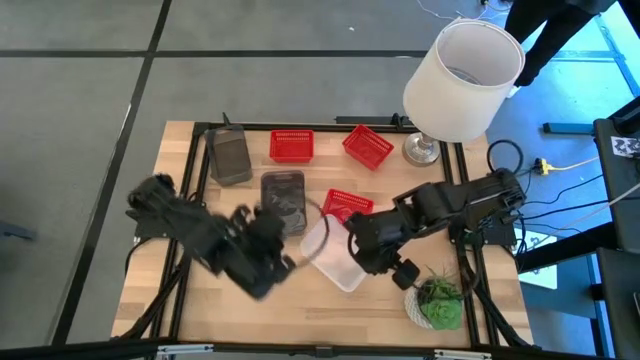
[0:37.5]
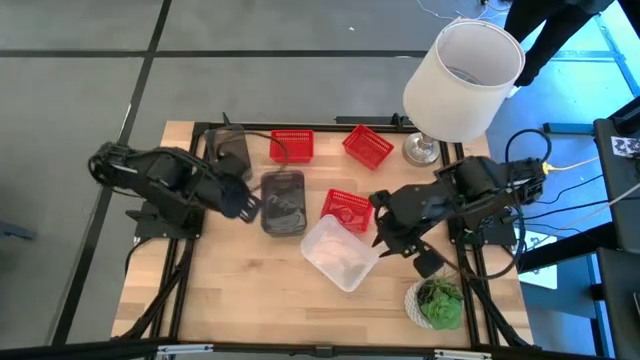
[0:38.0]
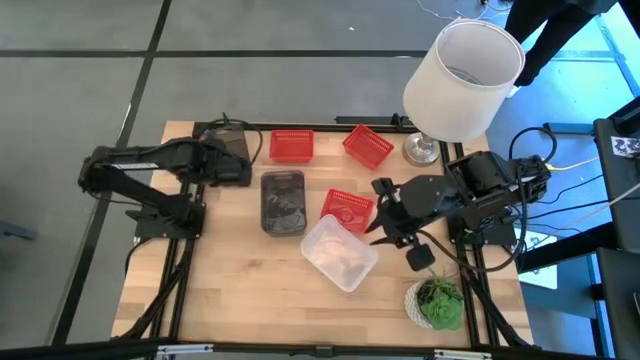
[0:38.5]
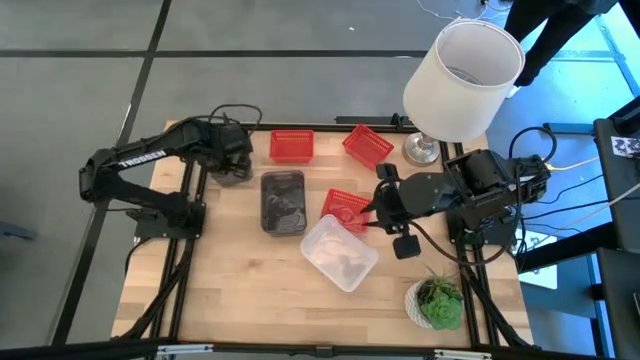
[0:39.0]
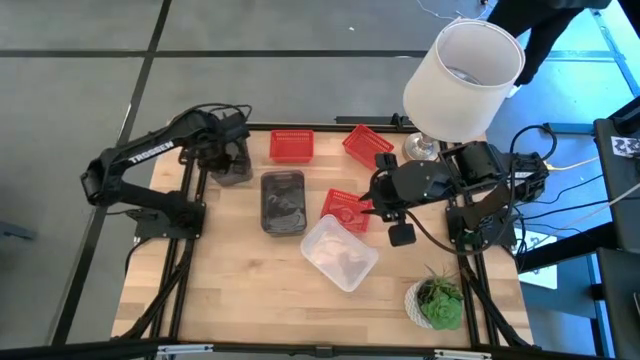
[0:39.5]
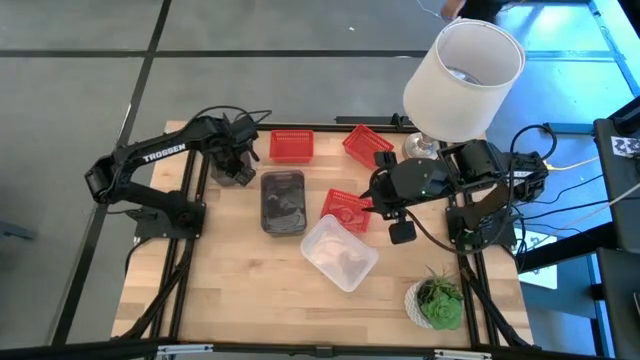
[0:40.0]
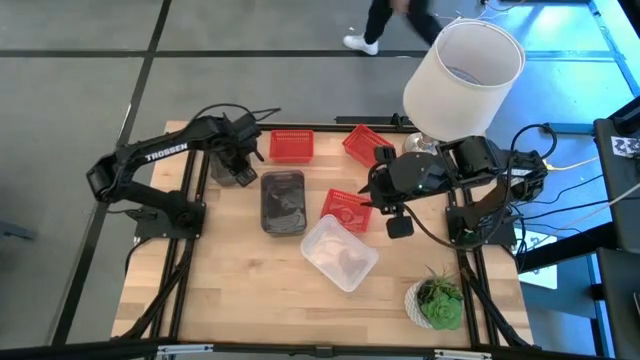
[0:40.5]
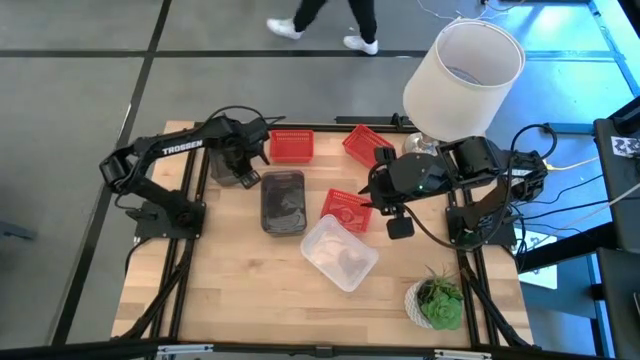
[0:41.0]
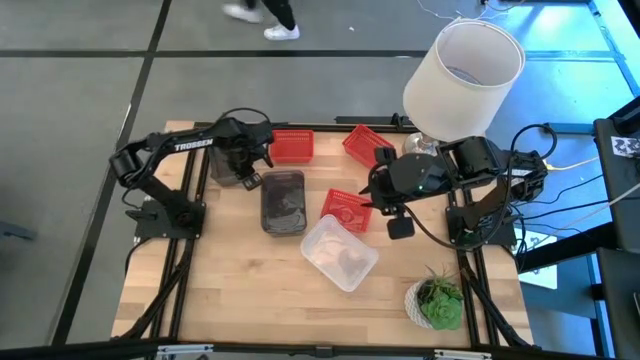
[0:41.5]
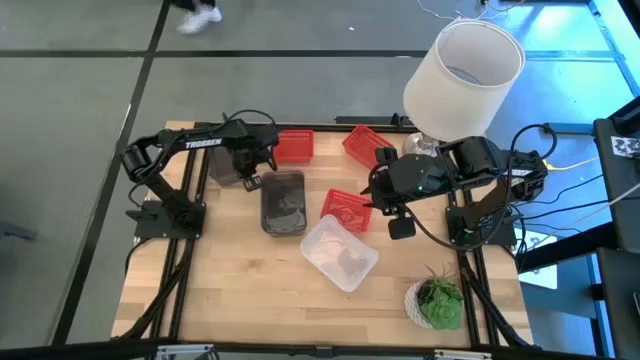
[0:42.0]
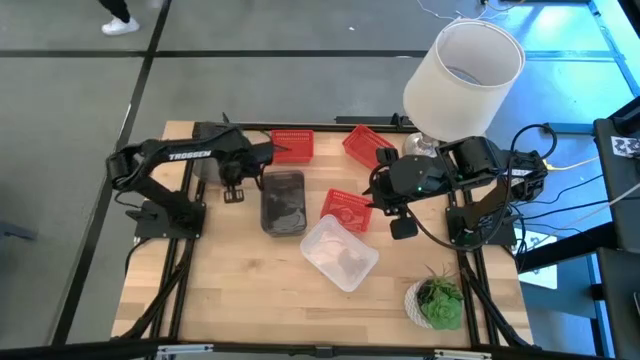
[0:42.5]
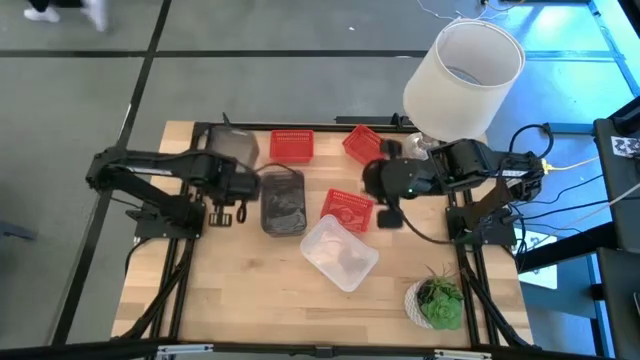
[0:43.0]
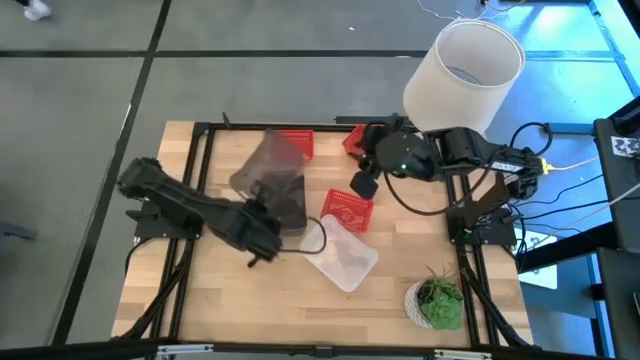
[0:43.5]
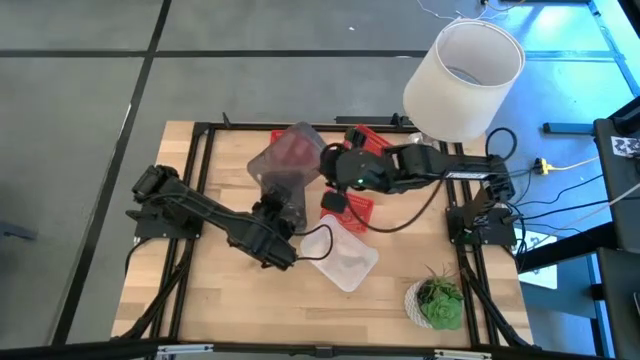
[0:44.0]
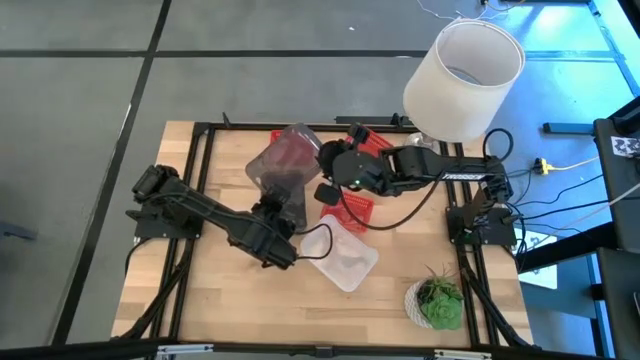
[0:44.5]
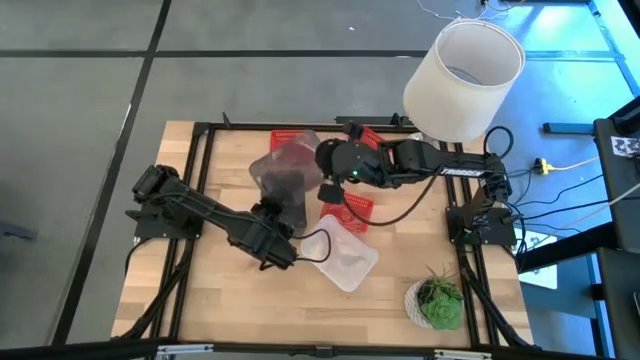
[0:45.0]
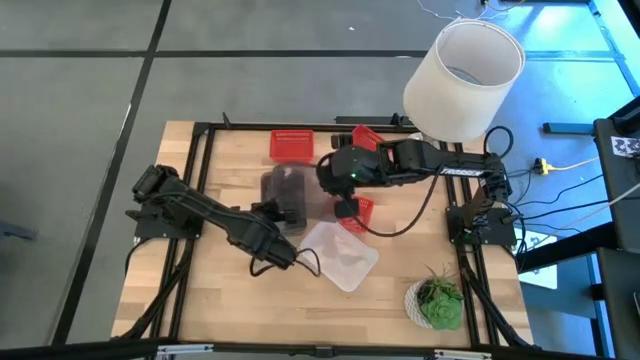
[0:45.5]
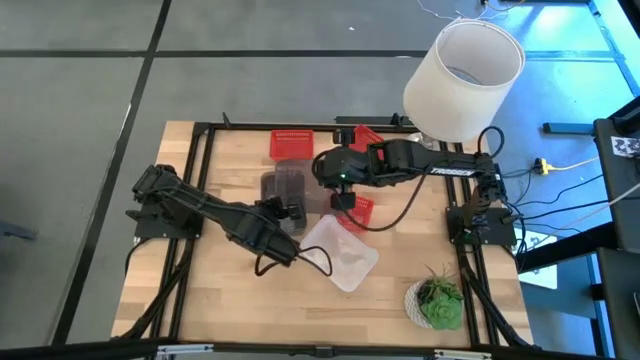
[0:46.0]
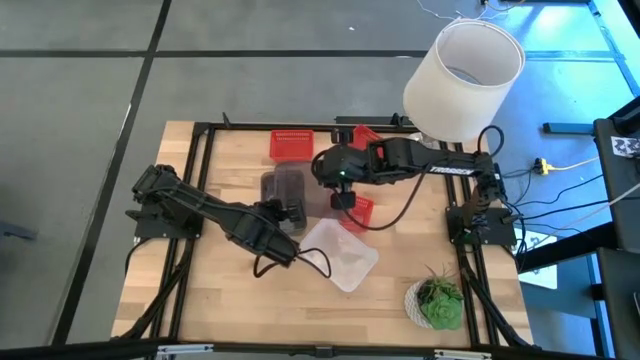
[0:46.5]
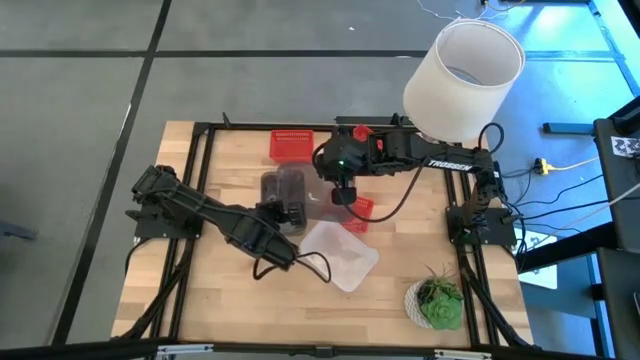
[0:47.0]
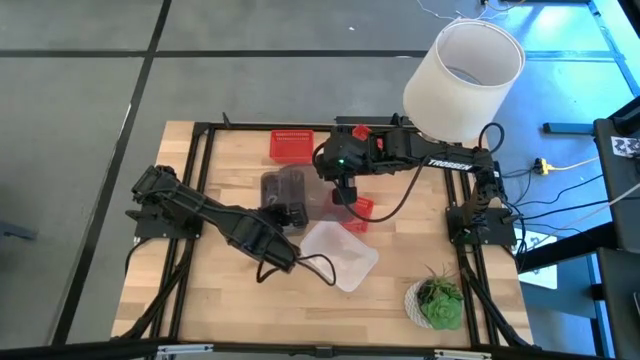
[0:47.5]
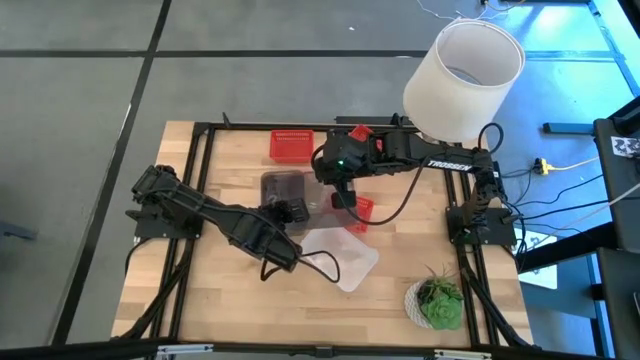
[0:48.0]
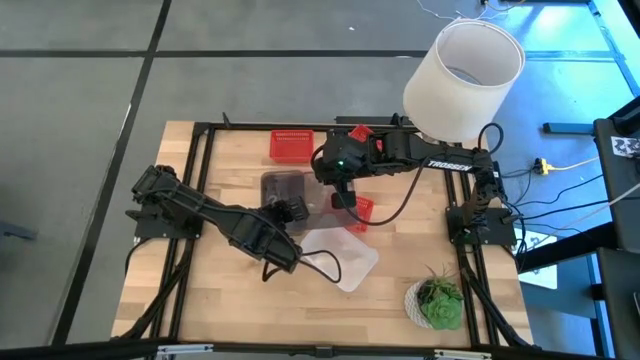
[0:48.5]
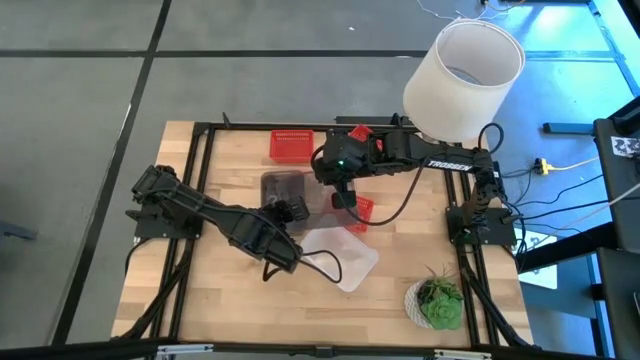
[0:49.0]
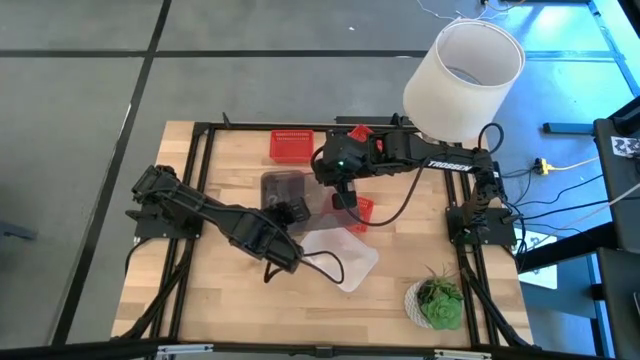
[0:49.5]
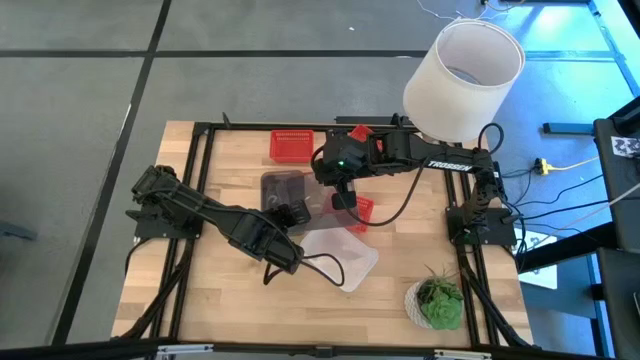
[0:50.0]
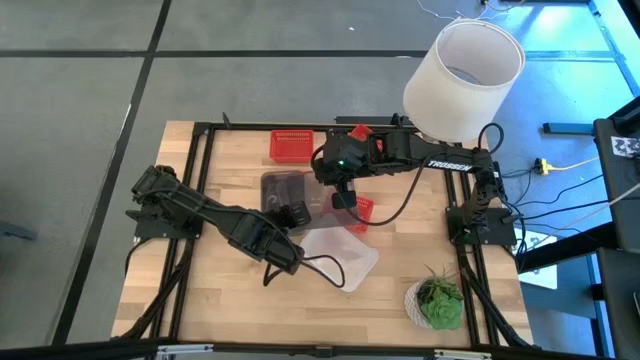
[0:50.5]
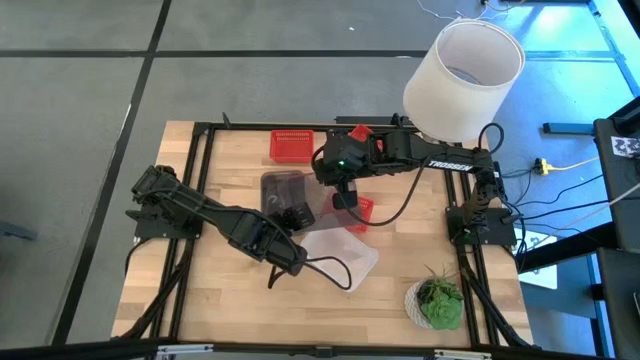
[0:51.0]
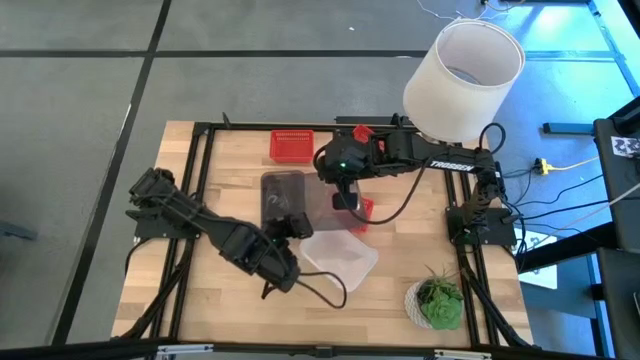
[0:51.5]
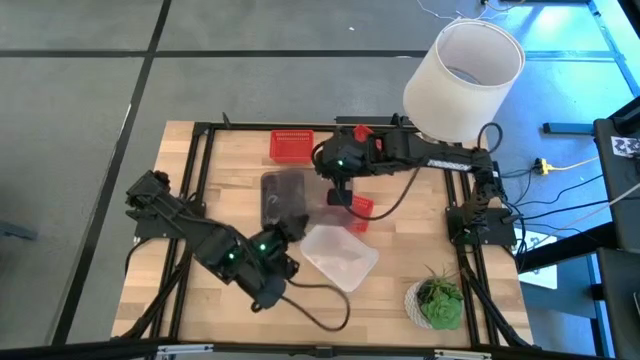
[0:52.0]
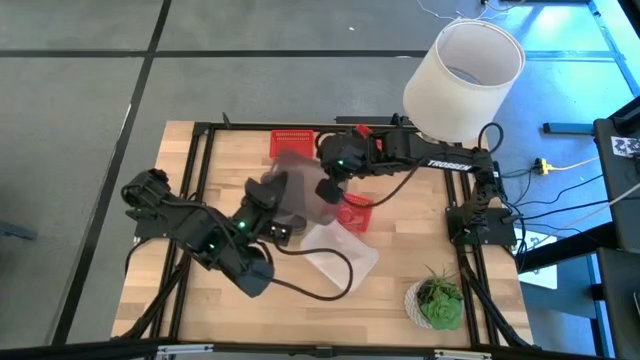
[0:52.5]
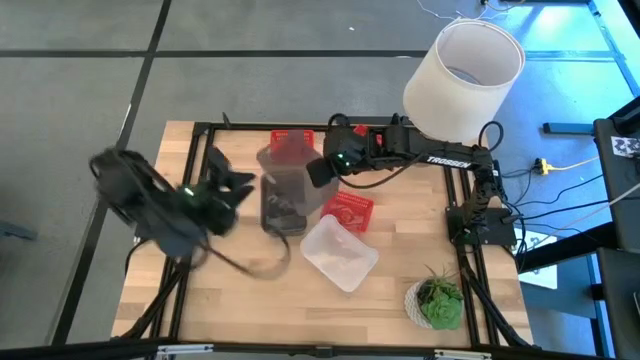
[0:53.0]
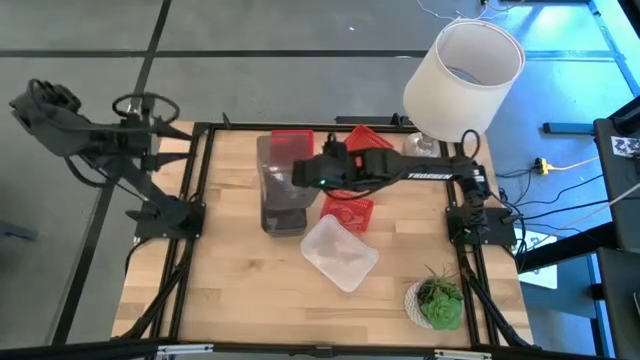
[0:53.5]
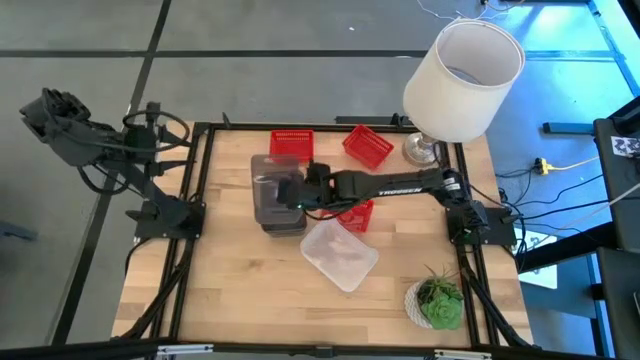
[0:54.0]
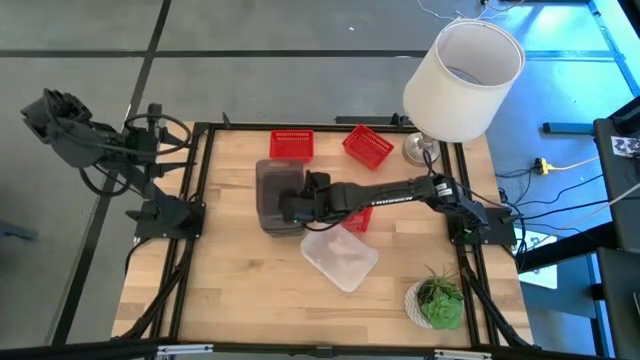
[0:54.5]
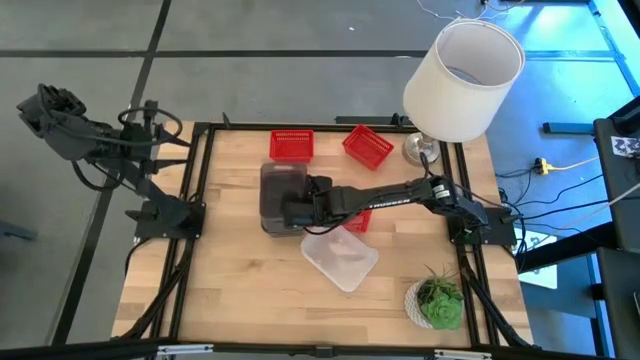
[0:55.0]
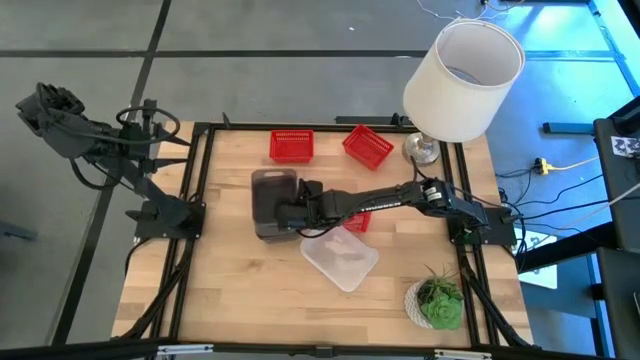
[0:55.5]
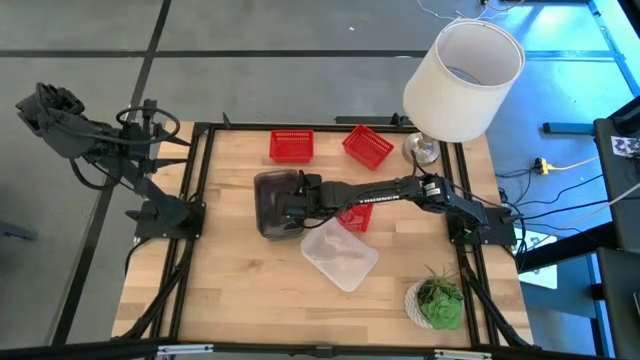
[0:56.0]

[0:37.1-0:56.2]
Stack the top black bin on the bottom black bins

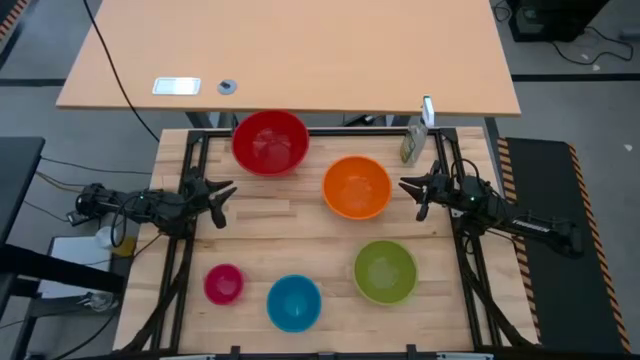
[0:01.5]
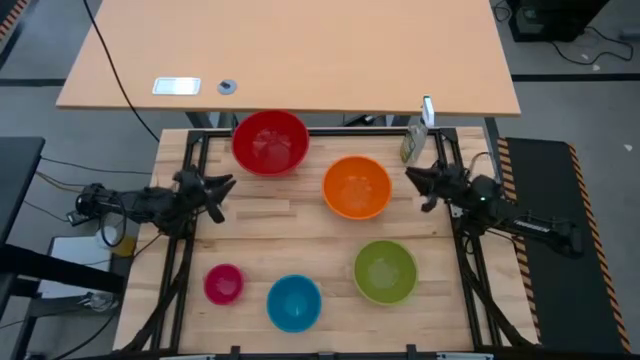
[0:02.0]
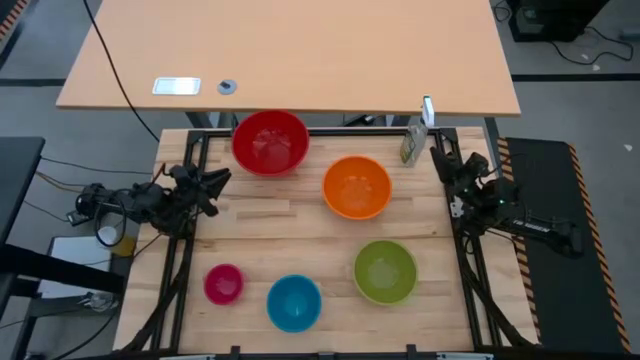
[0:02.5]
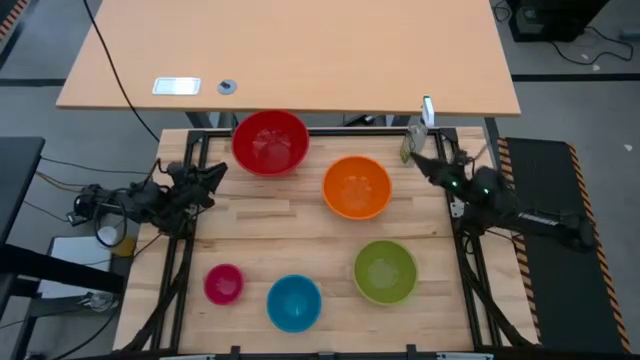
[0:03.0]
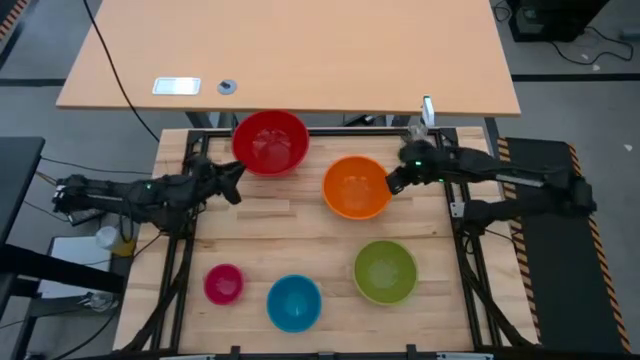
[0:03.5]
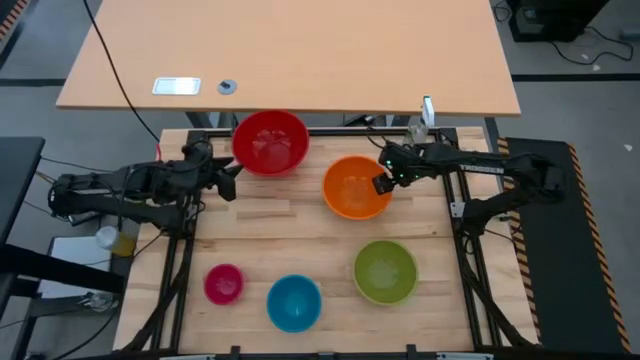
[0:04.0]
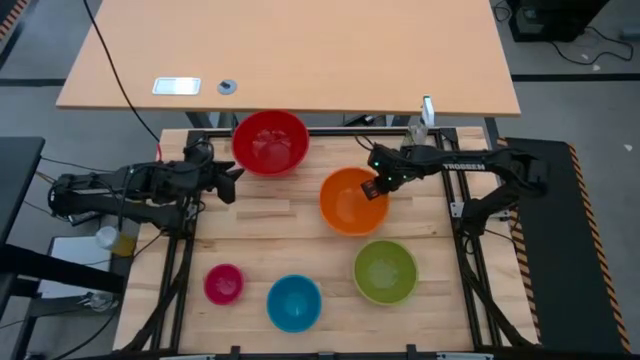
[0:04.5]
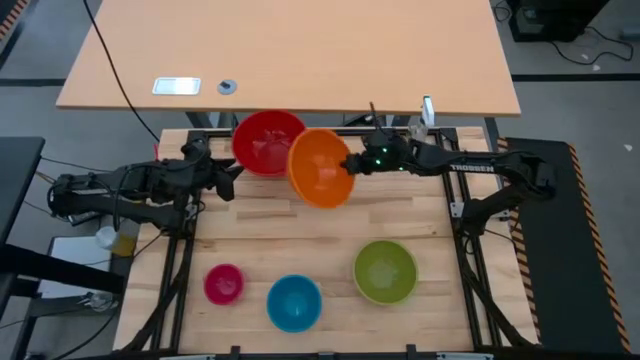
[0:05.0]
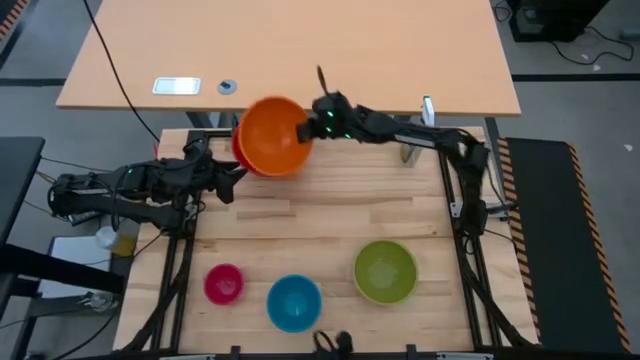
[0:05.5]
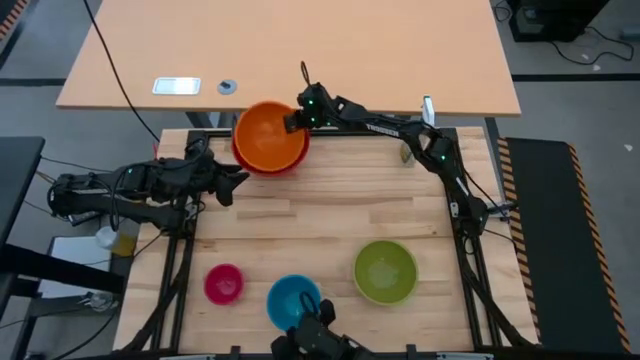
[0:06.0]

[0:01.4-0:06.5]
Stack the orange bowl on top of the red bowl
